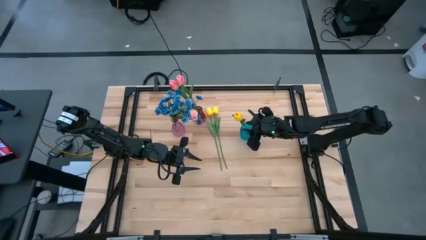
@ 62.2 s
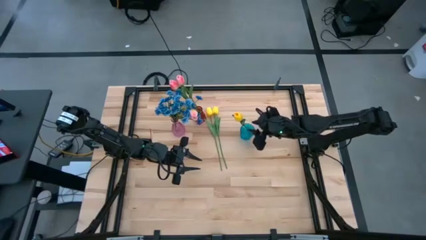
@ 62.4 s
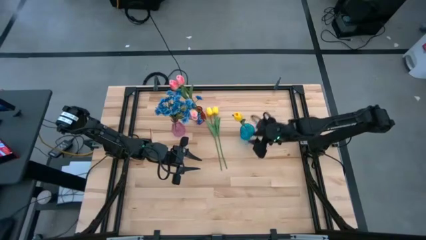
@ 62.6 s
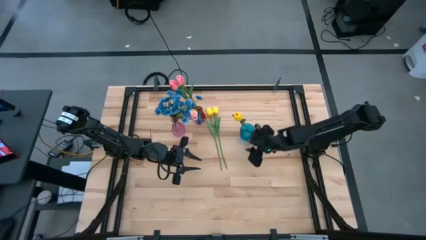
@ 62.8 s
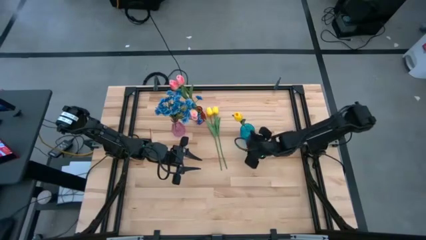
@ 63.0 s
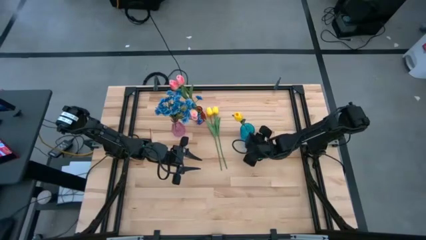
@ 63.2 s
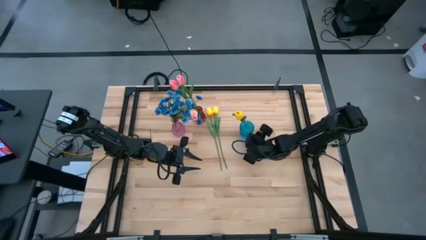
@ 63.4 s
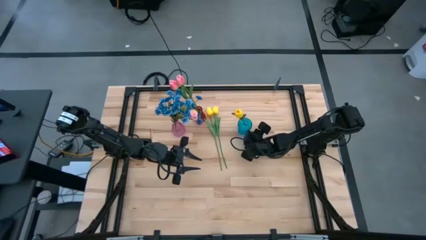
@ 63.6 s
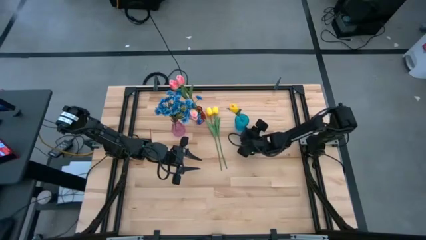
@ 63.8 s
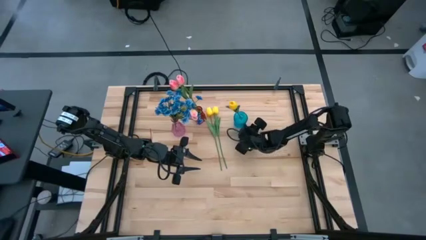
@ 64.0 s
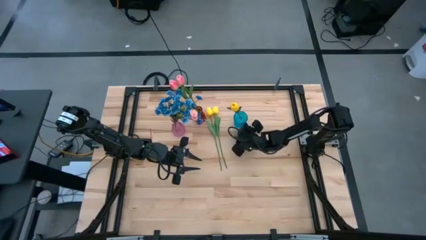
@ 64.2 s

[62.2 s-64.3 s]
Task: Sort flowers into vase by color
Adjust the blue vase

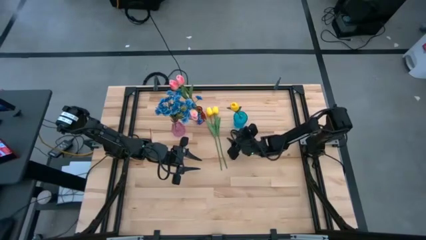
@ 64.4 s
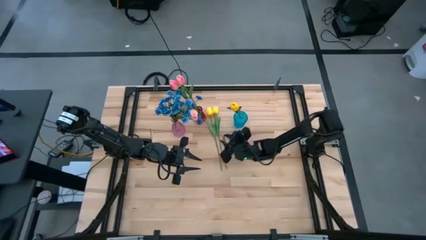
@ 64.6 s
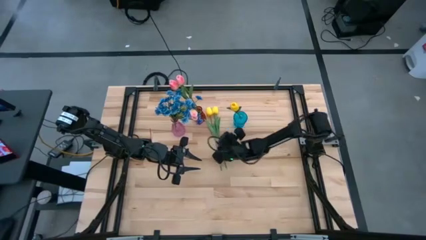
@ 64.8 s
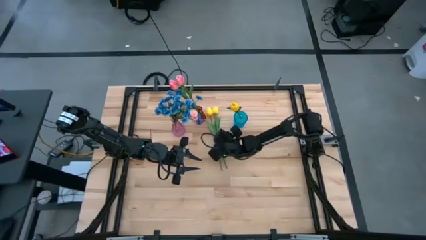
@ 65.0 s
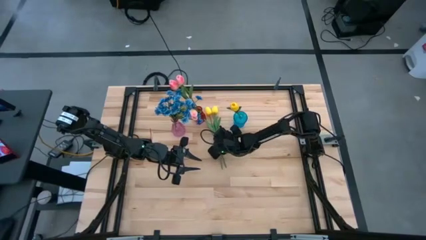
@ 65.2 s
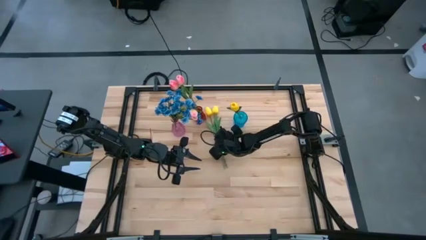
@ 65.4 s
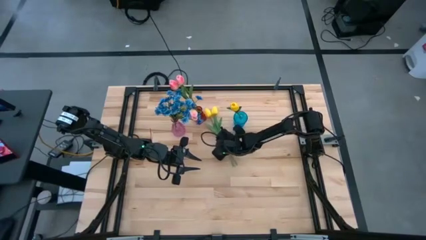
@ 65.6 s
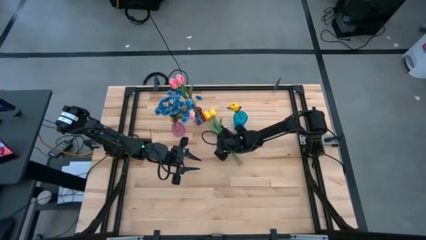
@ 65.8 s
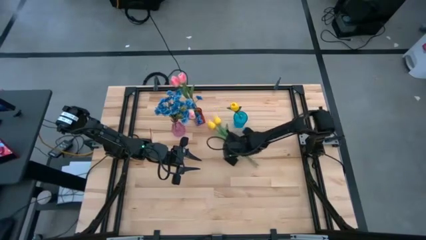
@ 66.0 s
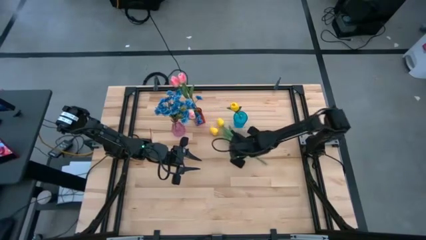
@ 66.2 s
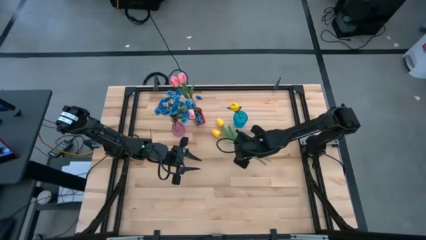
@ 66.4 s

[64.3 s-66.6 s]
Put the yellow tulip into the blue vase

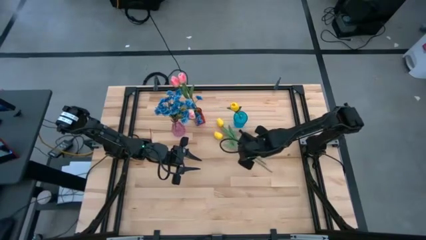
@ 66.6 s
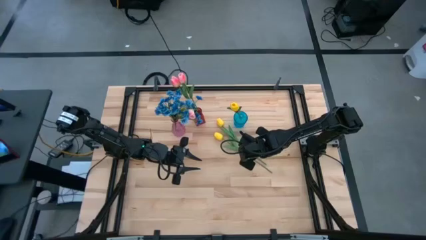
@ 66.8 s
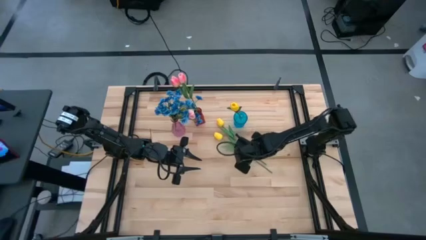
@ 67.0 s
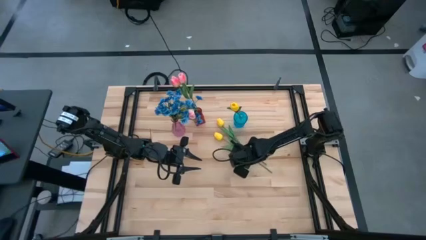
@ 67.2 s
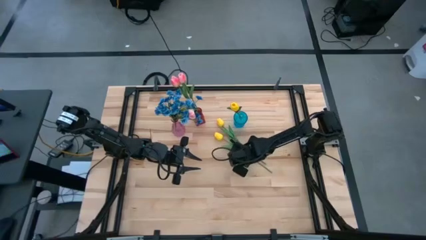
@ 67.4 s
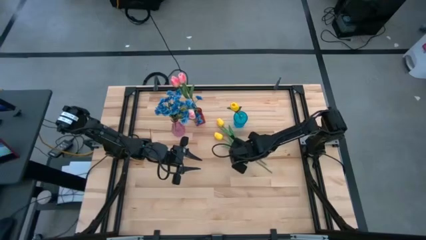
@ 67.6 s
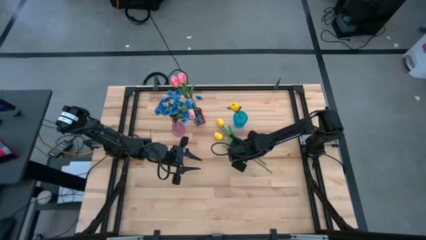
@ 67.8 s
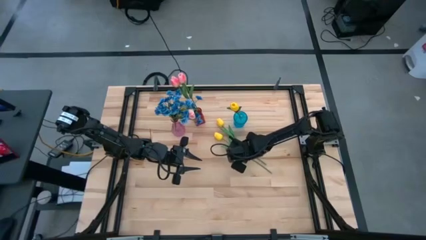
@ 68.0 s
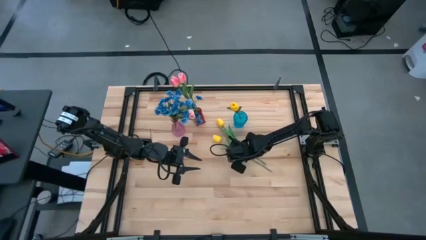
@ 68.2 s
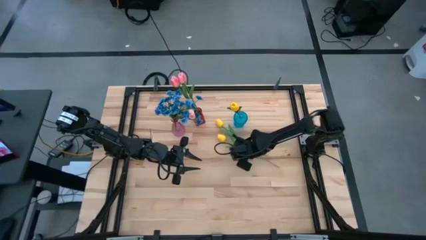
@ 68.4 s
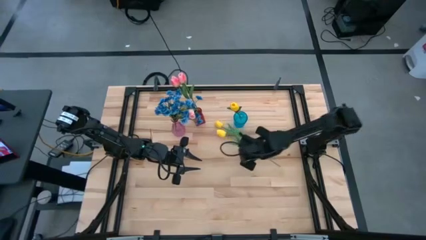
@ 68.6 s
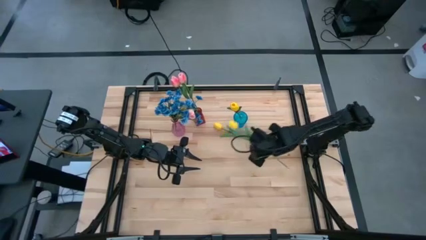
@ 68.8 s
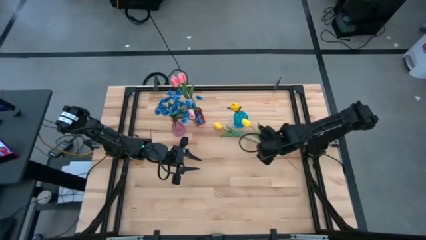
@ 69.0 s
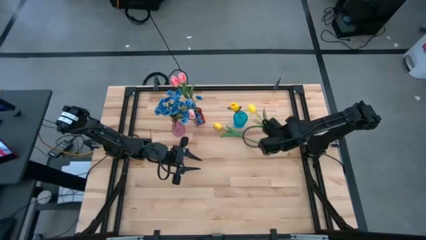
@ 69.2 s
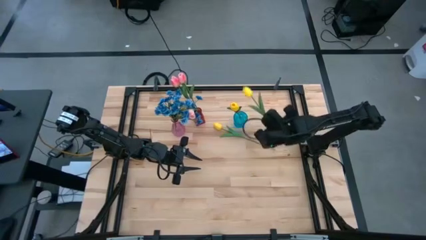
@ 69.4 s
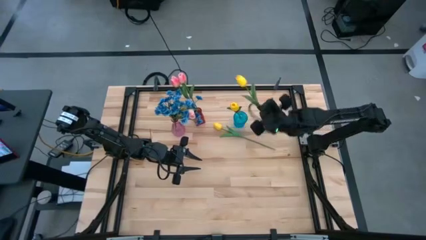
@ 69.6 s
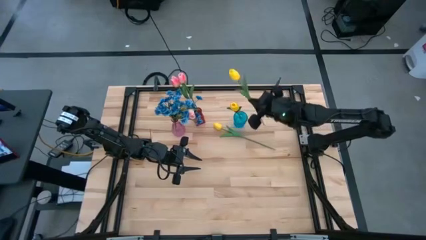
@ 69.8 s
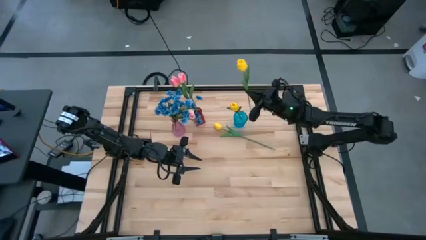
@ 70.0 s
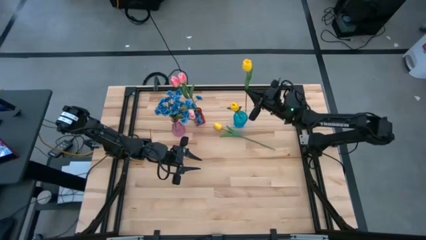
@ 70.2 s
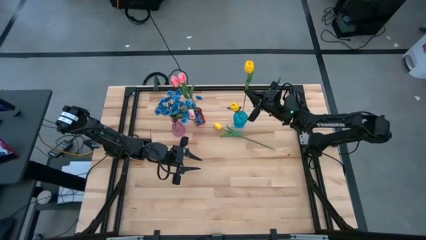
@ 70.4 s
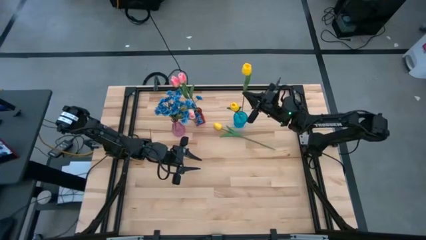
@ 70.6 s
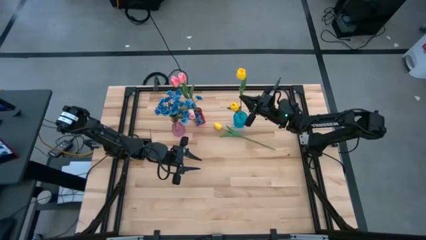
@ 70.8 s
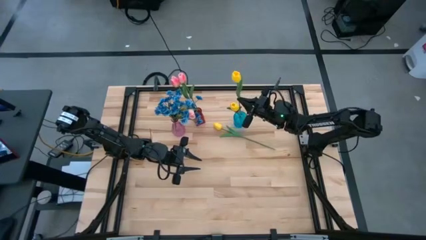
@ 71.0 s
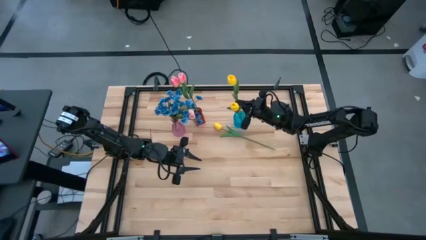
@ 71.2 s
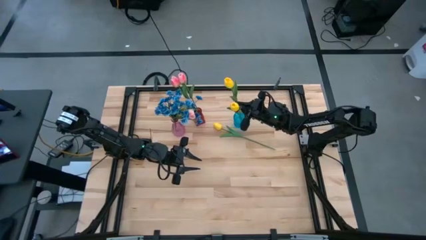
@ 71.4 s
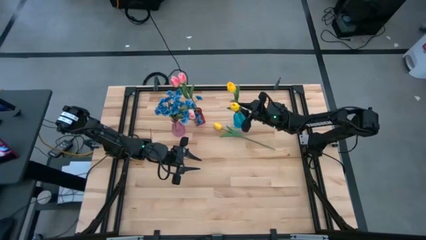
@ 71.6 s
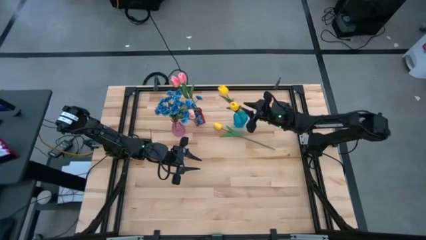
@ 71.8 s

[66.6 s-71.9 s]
Put the yellow tulip into the blue vase

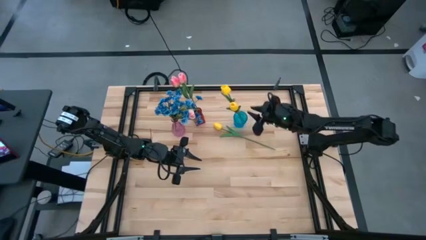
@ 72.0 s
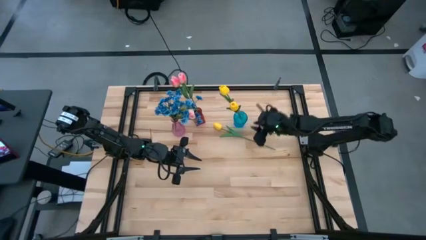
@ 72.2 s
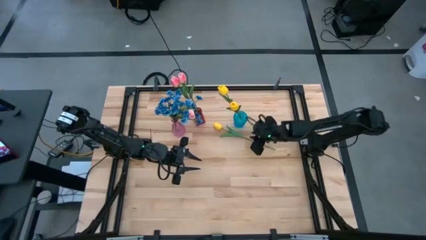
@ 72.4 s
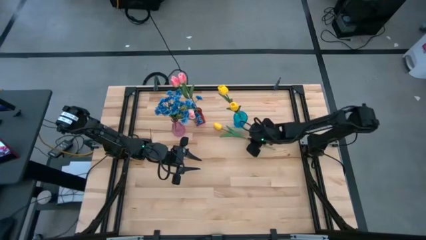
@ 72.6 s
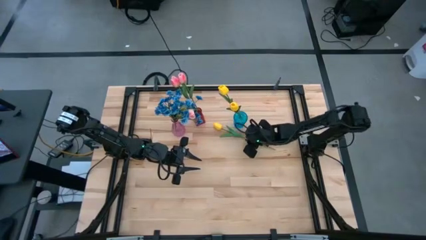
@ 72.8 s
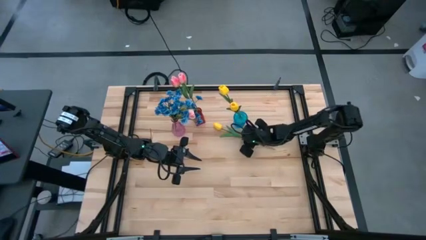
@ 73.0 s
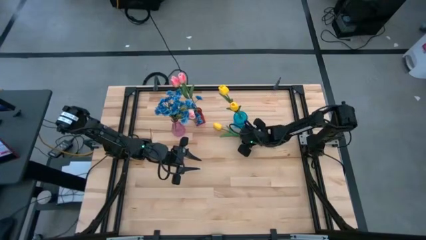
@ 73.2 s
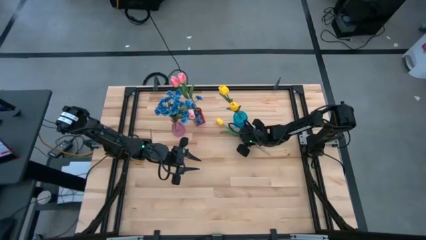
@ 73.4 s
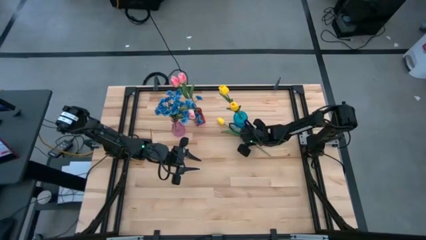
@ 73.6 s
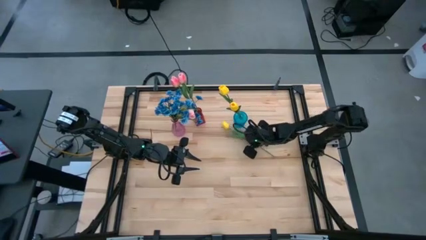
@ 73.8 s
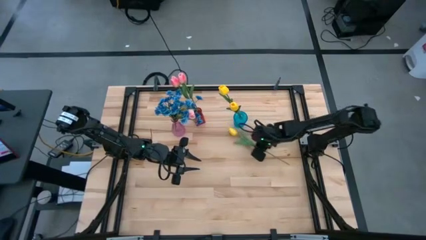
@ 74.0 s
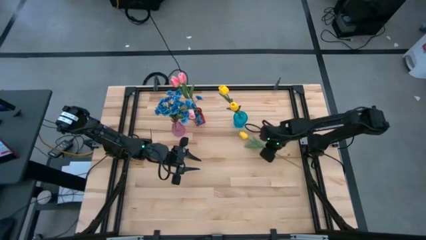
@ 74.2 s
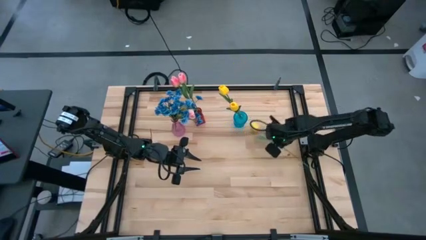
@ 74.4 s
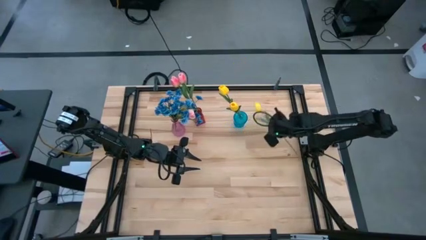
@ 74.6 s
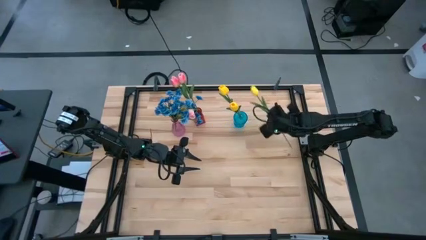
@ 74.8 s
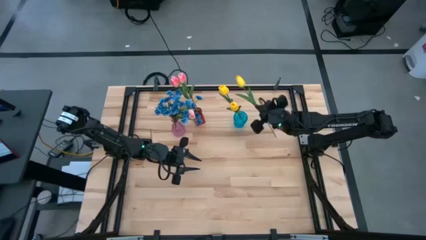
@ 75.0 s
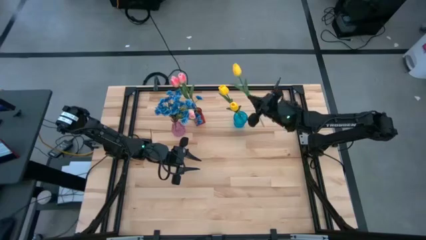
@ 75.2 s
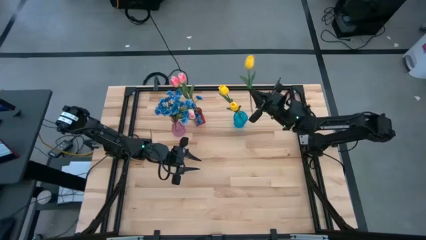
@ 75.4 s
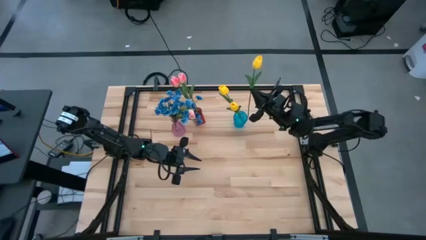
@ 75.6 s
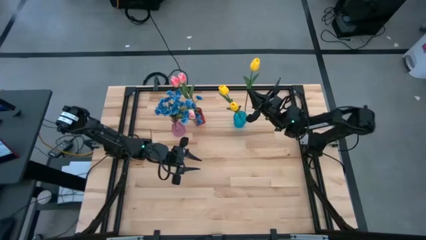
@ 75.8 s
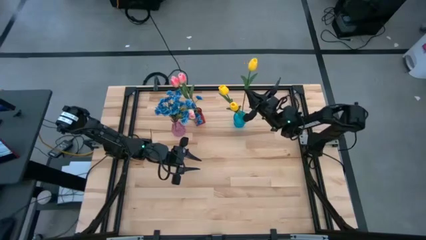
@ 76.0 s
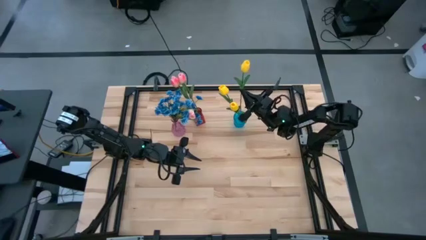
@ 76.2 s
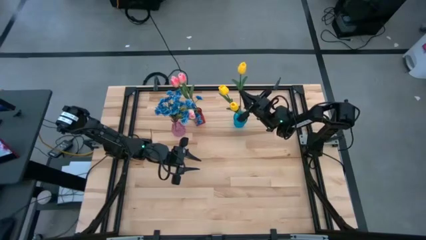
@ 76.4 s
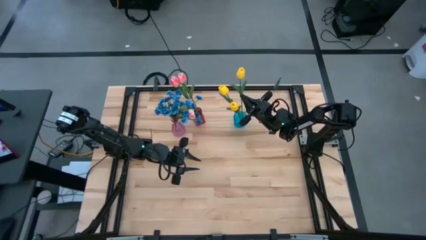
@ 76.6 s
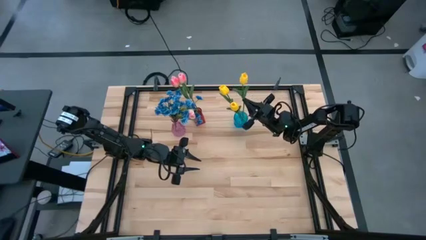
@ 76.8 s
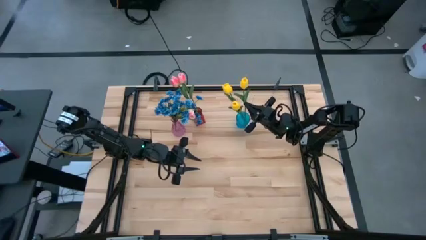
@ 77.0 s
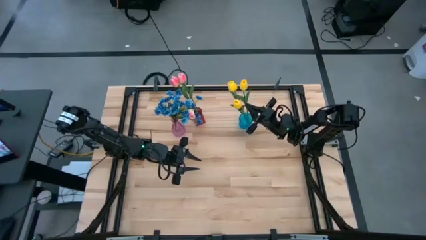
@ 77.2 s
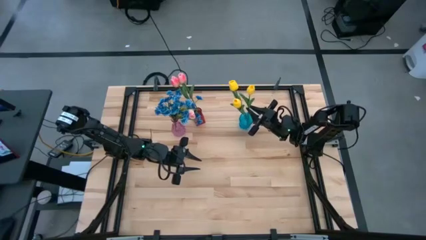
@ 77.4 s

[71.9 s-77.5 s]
Put the yellow tulip into the blue vase
